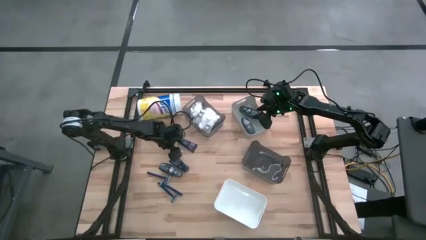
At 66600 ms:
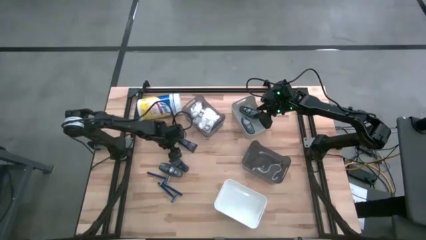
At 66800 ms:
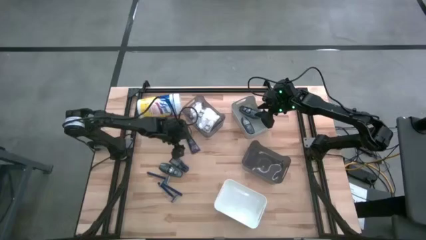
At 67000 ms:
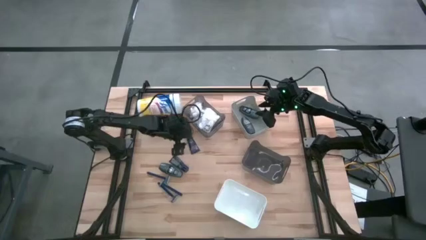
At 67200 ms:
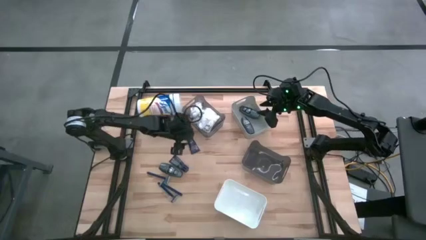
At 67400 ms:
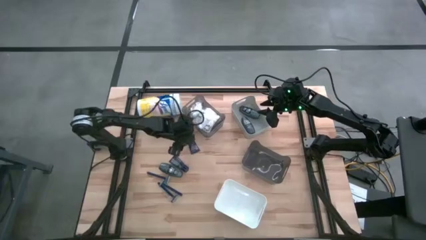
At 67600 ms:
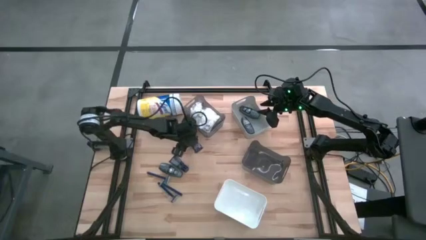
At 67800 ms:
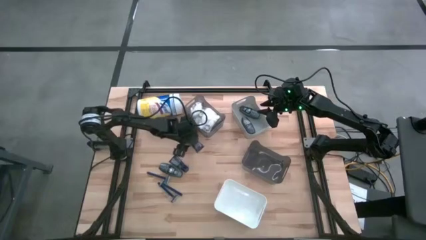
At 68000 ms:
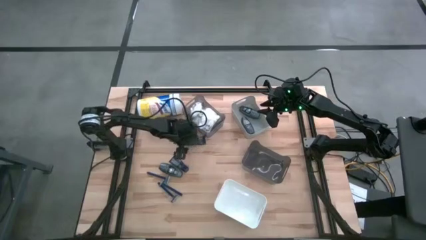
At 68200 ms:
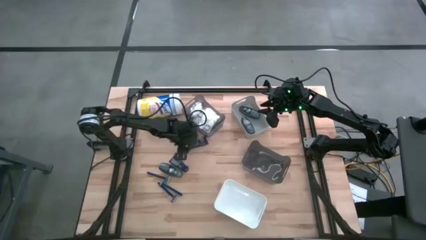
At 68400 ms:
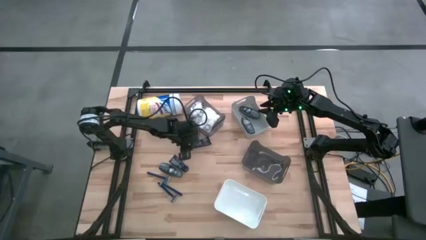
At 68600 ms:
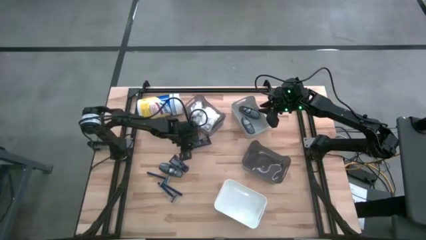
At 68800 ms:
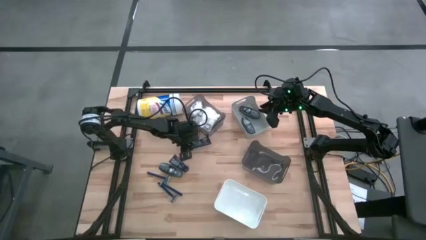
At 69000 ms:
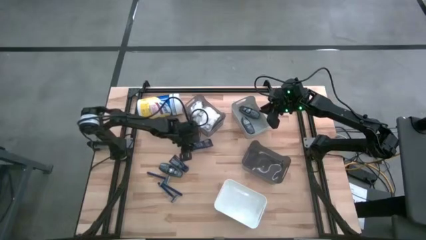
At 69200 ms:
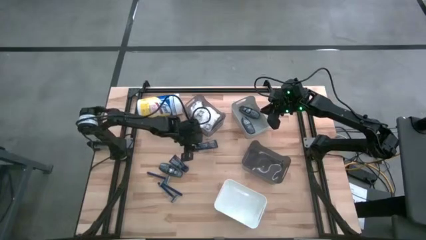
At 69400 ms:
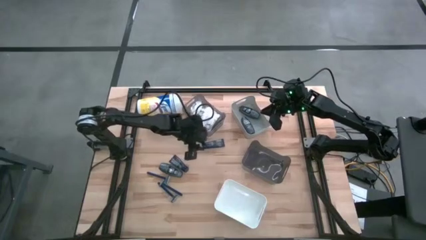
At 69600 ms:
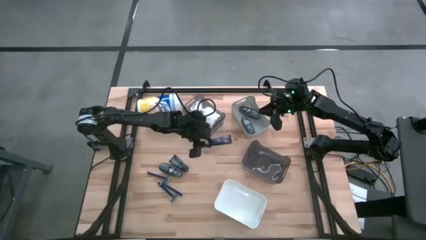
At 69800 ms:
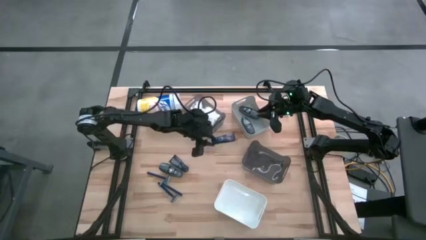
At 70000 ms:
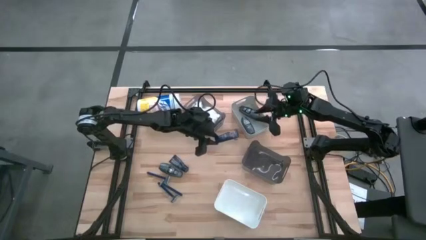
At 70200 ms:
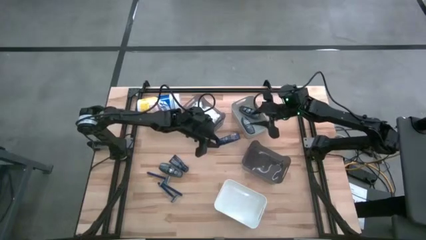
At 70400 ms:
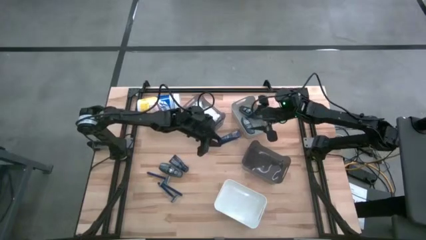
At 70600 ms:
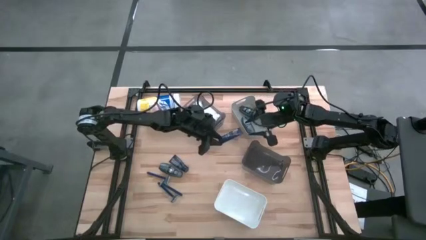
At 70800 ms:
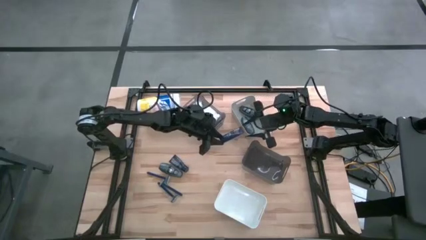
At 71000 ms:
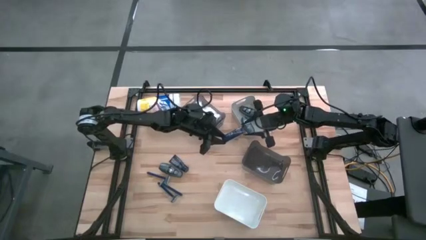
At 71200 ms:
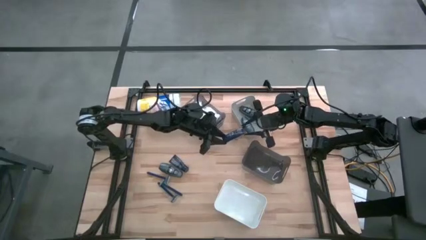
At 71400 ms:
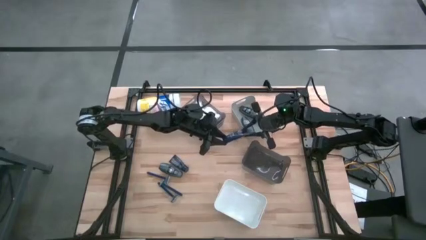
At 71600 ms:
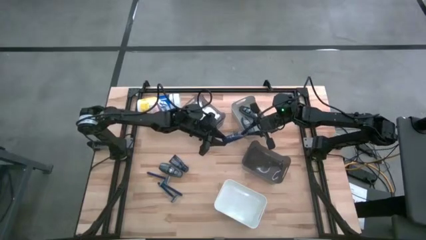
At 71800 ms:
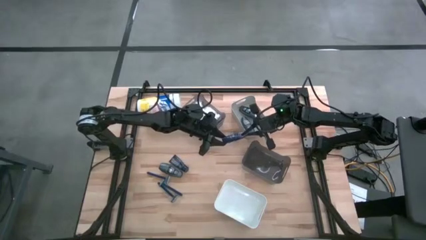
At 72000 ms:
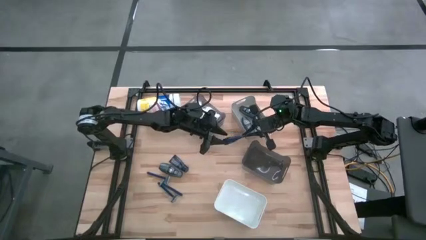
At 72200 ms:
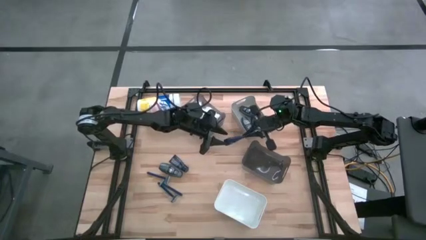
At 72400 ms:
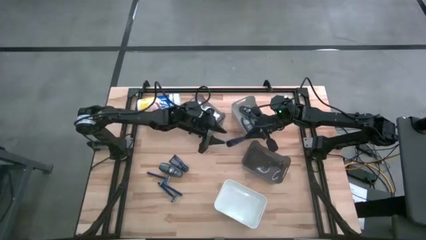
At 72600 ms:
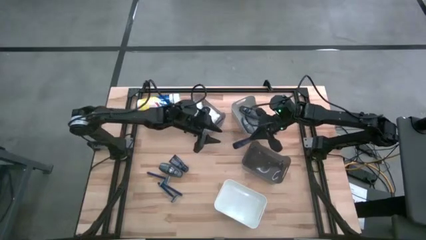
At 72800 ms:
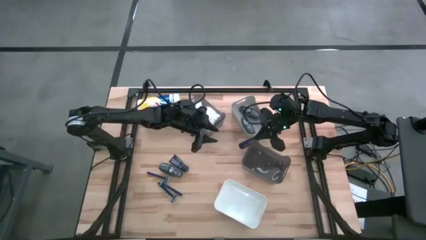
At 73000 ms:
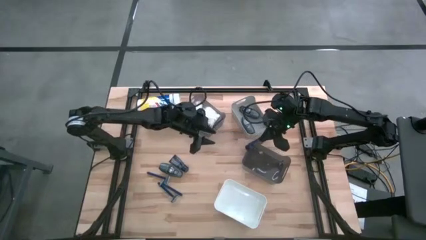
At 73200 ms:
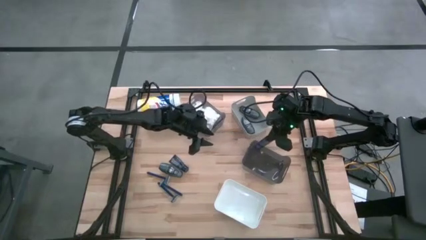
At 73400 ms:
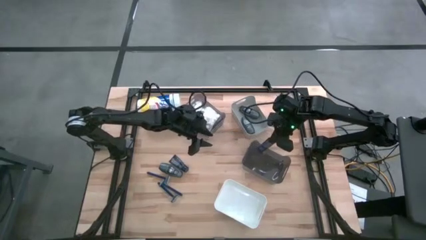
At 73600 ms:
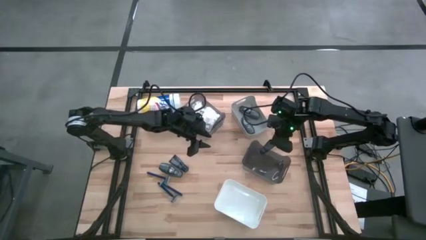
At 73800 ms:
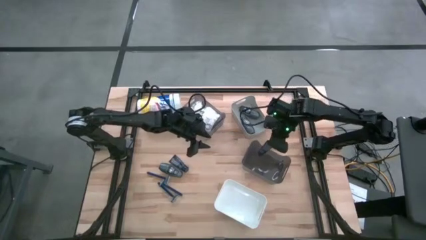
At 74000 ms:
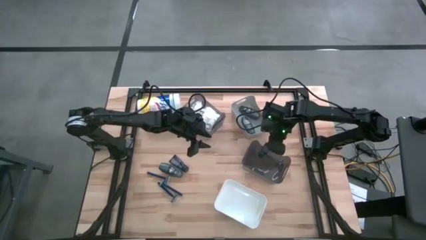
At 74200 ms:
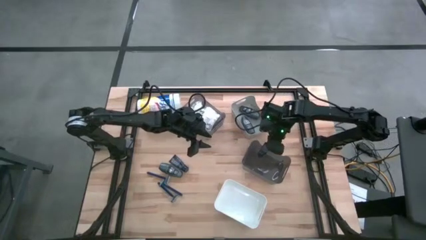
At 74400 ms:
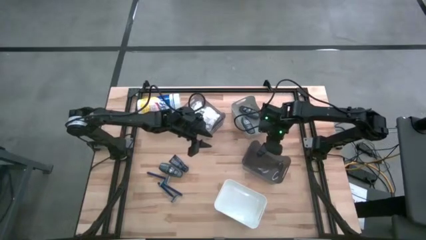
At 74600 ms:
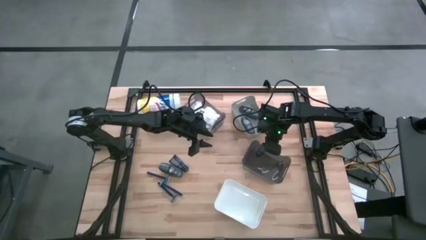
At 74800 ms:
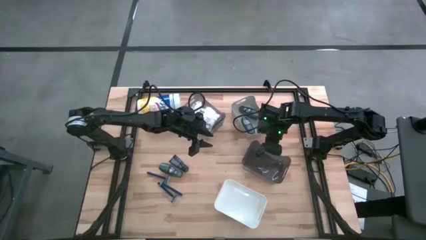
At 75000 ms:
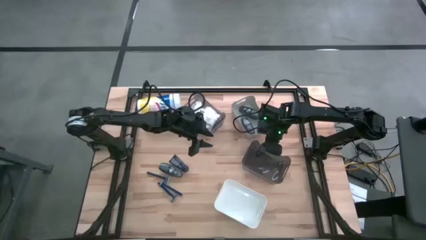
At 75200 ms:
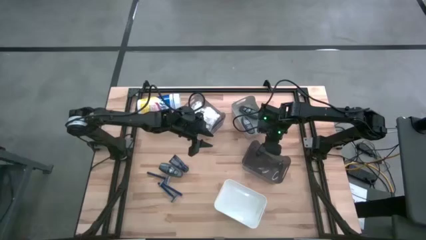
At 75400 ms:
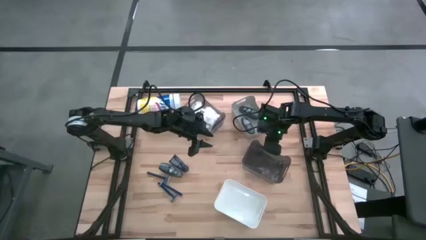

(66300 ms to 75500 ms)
Task: Pick & Place Travel size toiletries
Put the blue shave cream into the bottom black bin

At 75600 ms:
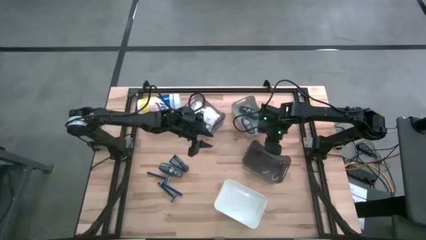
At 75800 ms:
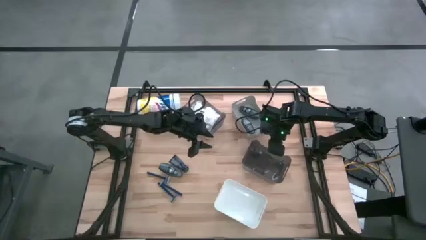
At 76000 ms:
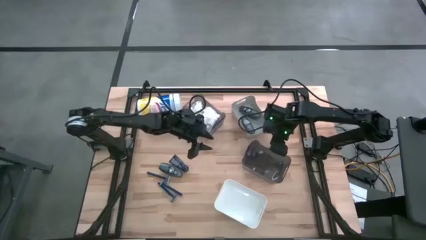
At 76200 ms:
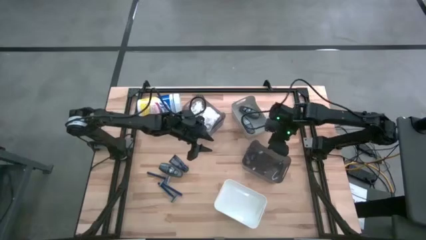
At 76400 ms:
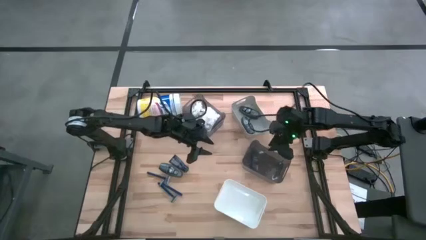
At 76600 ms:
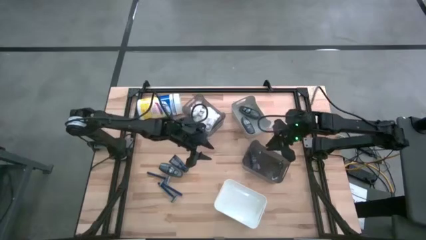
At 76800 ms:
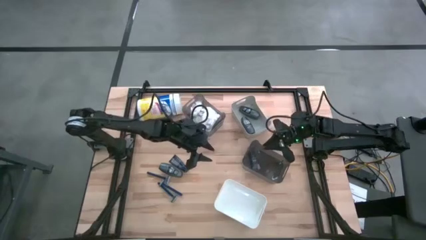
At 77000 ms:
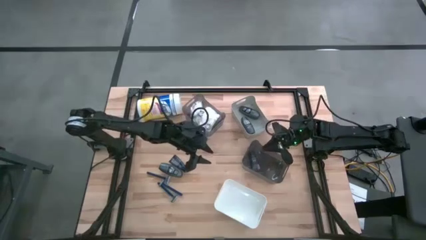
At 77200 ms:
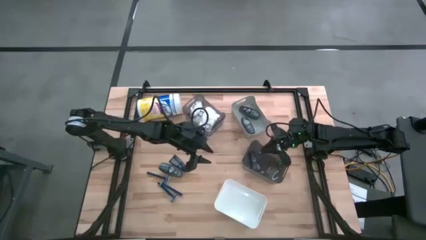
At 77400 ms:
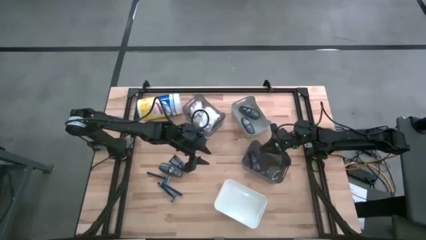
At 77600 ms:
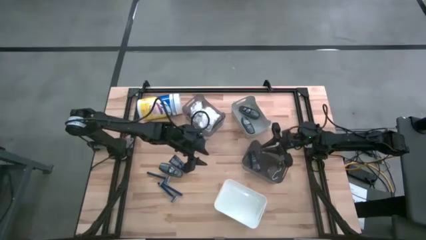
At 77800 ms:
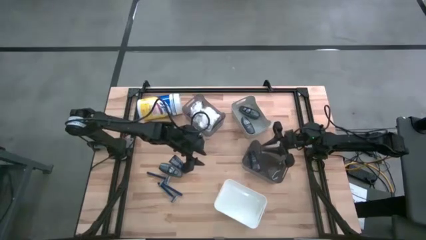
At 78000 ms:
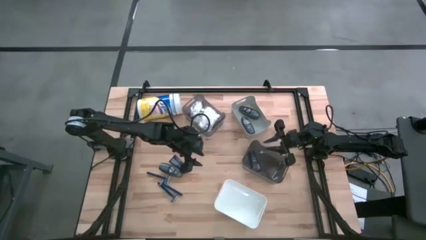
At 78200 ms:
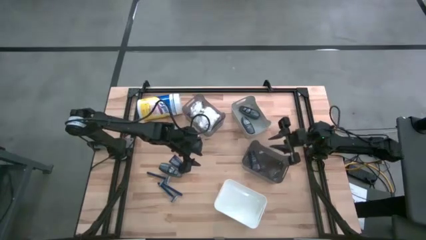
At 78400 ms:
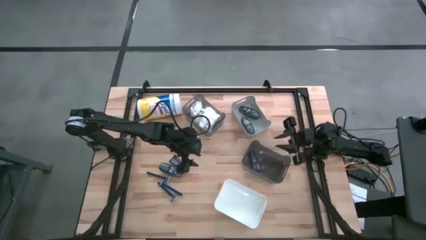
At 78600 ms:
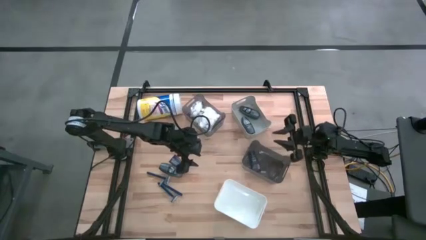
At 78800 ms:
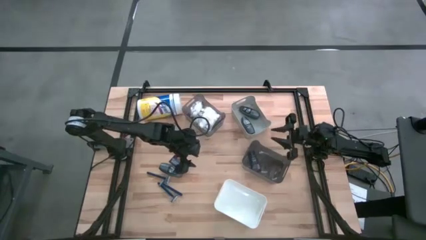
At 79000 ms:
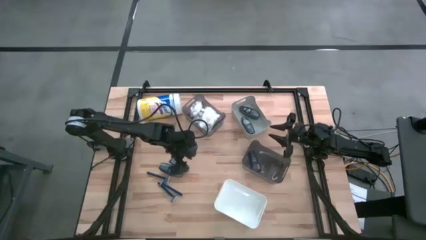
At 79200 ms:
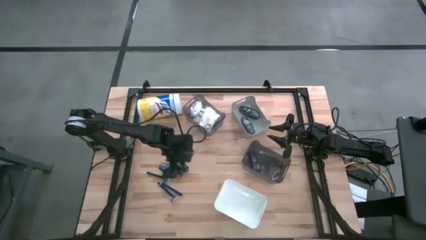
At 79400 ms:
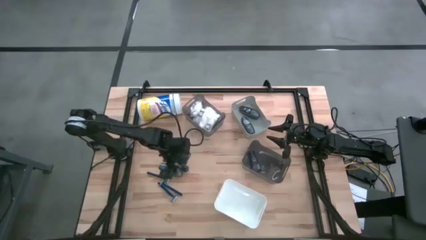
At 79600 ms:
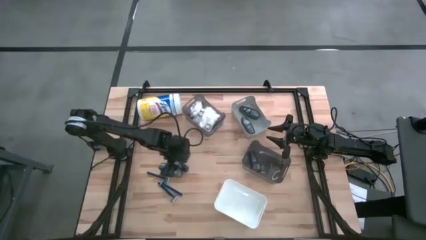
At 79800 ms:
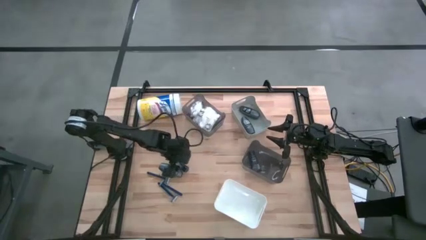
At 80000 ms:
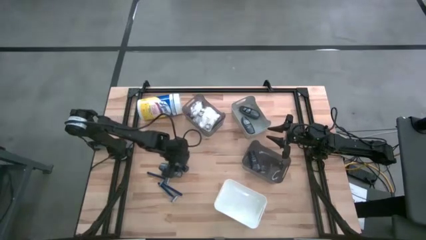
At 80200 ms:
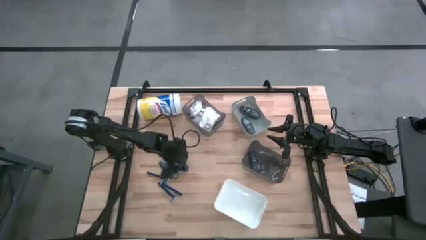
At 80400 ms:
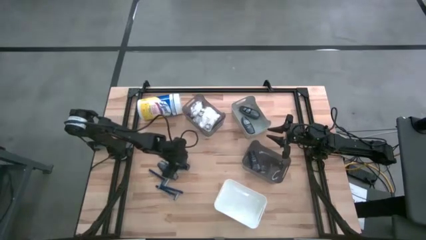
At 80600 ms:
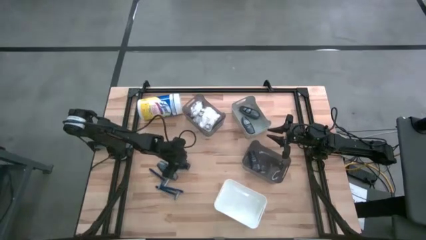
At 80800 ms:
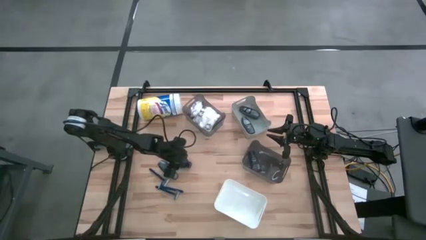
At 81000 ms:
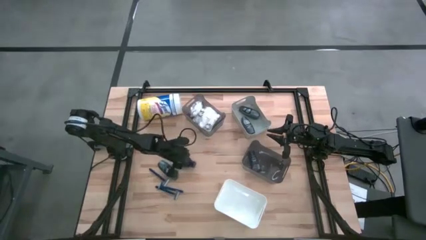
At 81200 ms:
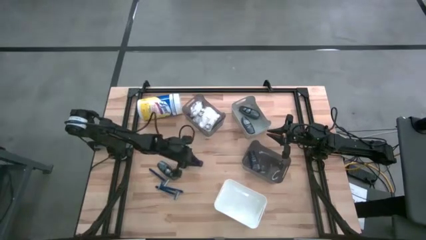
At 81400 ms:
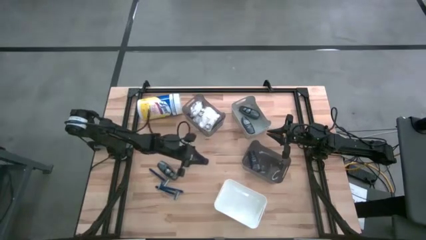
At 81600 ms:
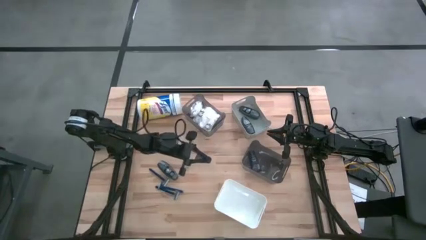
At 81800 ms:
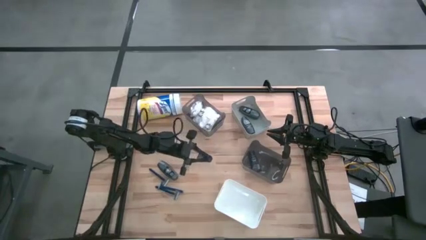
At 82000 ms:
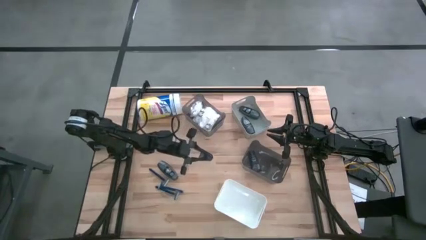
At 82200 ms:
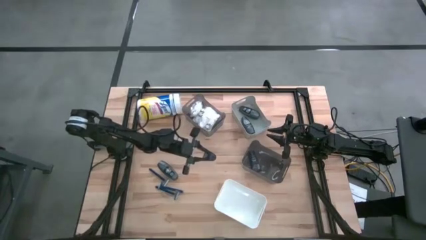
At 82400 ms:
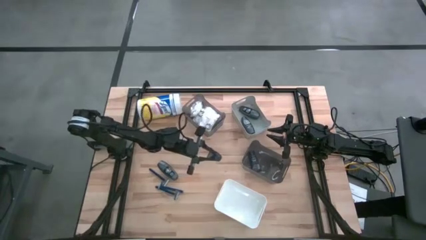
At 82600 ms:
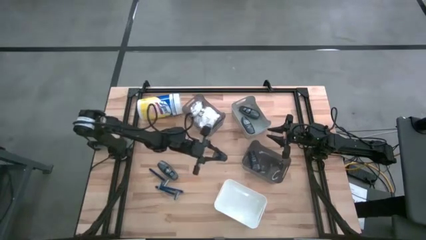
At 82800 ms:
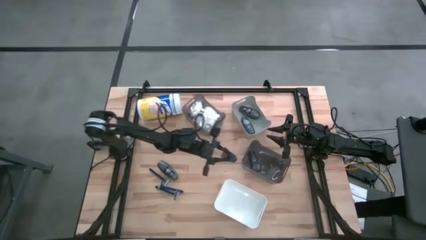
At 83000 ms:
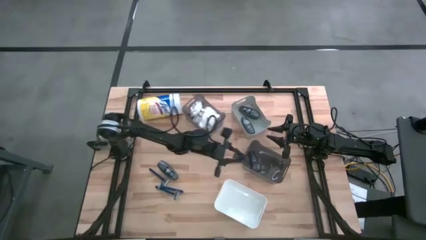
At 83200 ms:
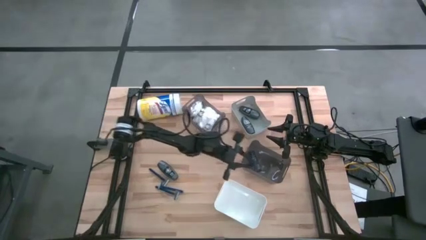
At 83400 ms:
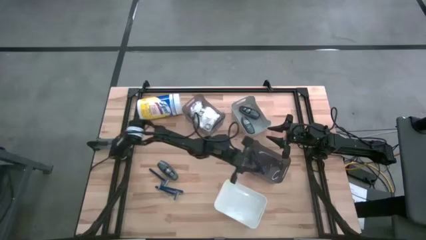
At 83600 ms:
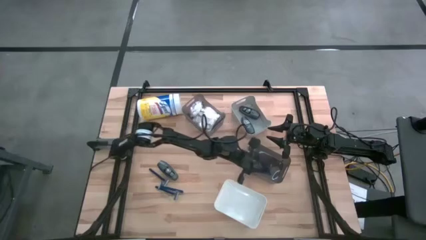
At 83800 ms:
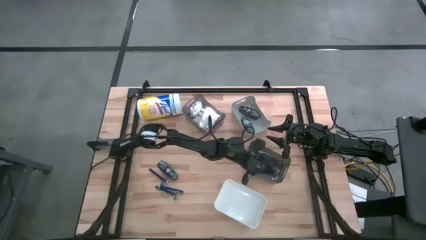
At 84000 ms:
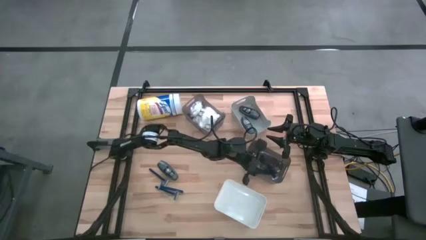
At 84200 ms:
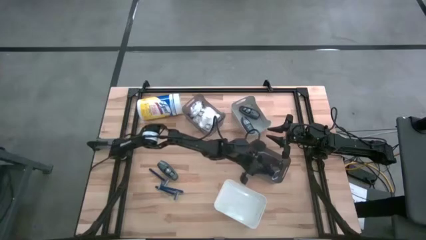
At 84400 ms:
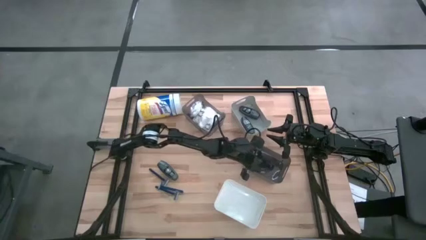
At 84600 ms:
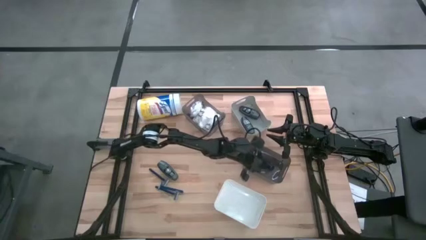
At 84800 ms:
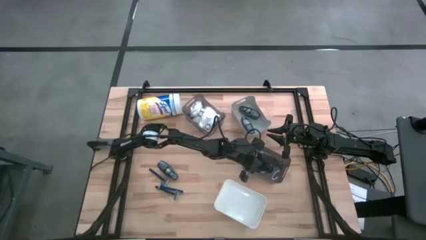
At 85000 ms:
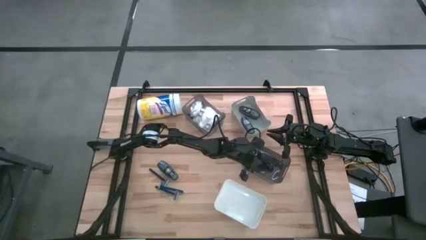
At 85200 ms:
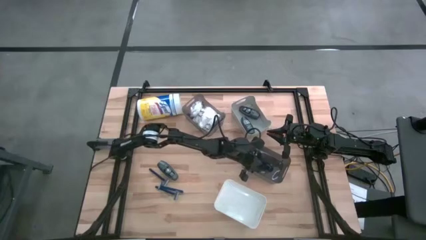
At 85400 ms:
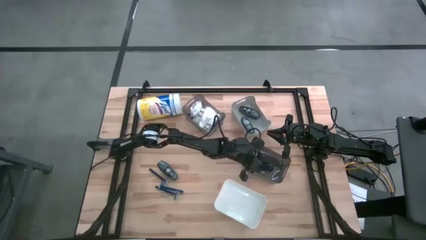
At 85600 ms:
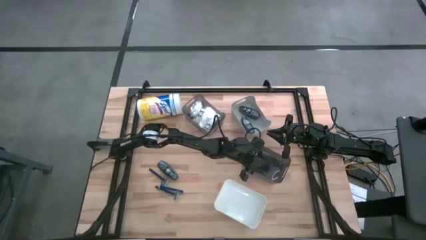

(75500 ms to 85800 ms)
Put the blue shave cream into the bottom black bin
